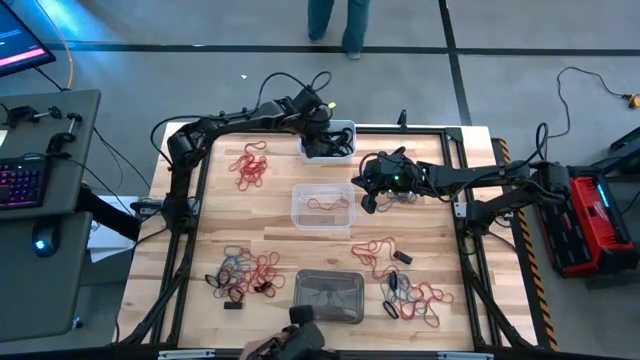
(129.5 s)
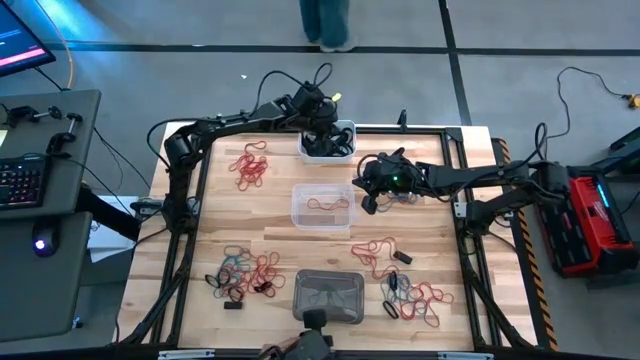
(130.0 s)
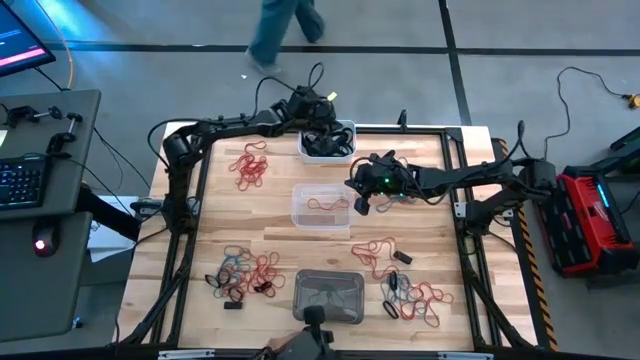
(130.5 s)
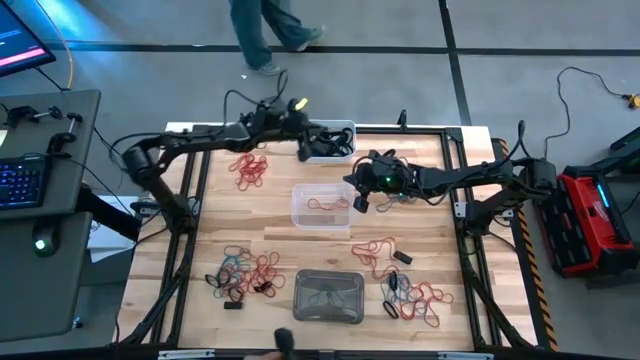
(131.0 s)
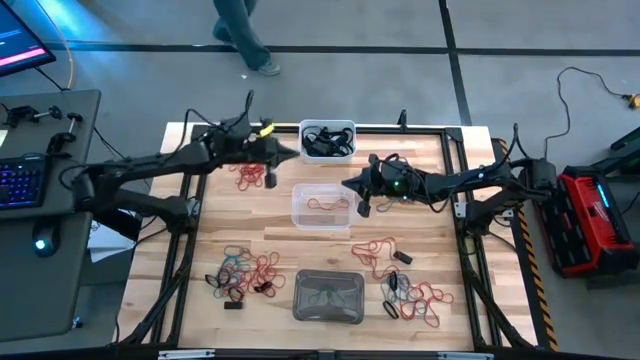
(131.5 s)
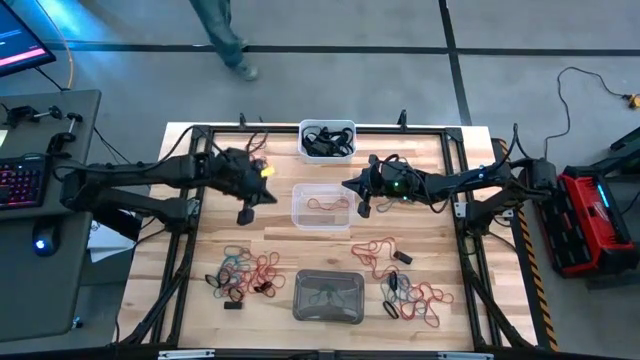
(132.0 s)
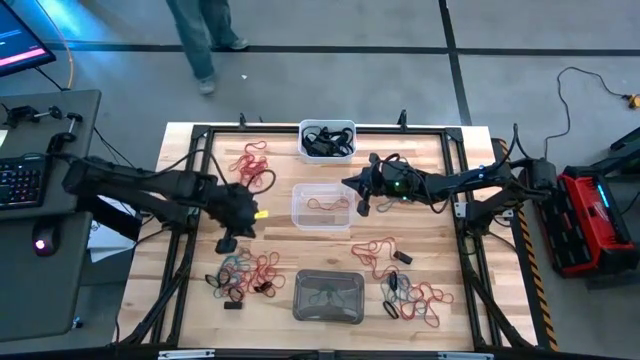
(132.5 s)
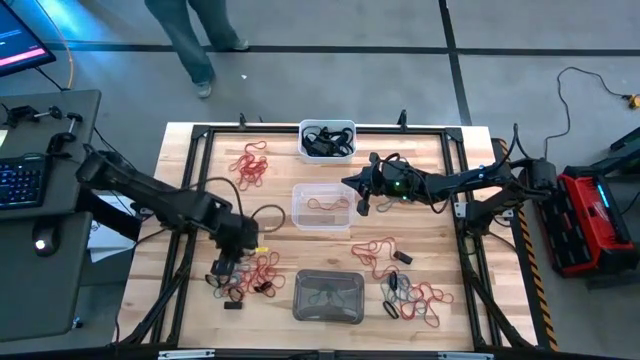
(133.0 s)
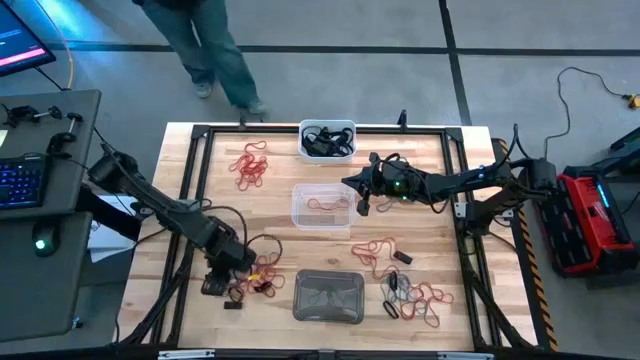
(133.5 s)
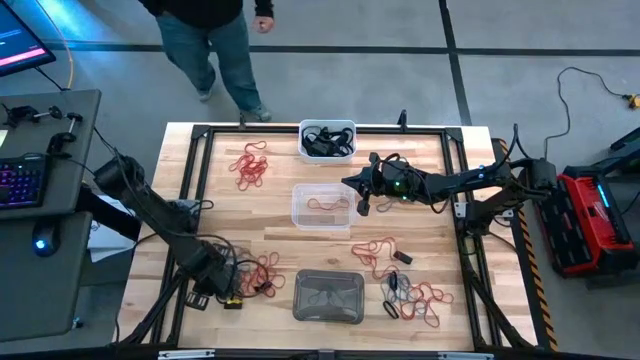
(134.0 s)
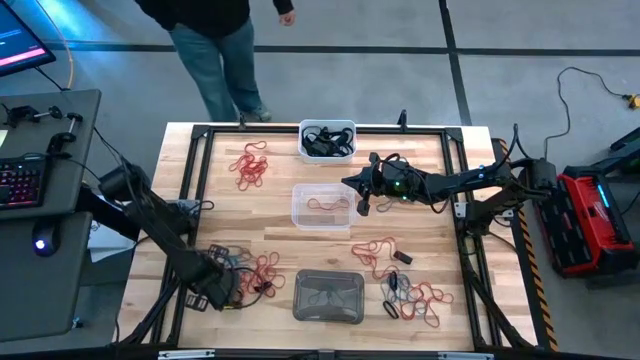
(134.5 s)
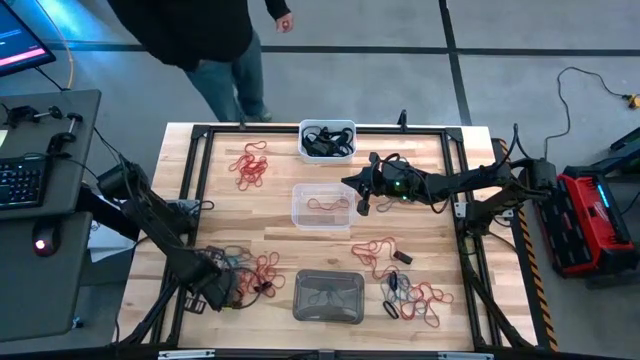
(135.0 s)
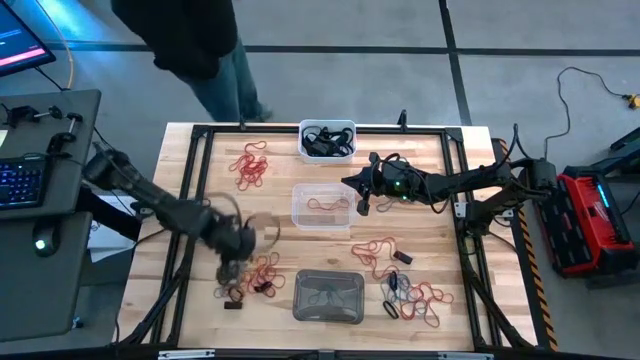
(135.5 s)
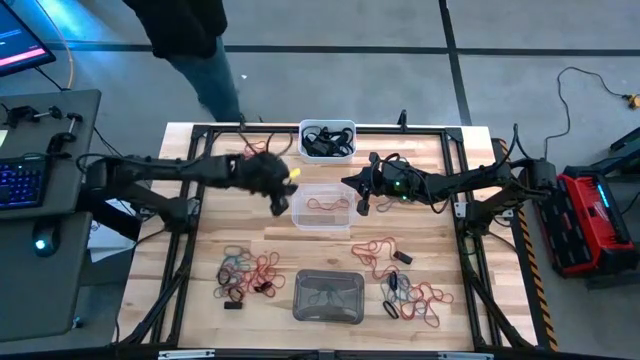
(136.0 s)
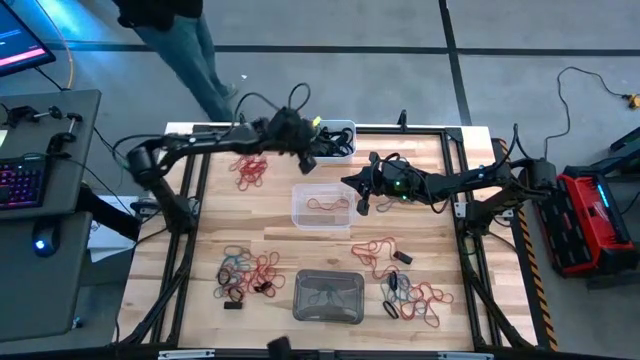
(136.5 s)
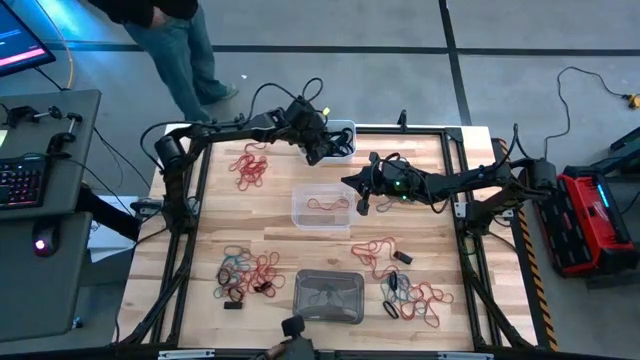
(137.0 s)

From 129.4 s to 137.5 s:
Task: Sort rubber bands into baskets
Put the black rubber band into the white bin

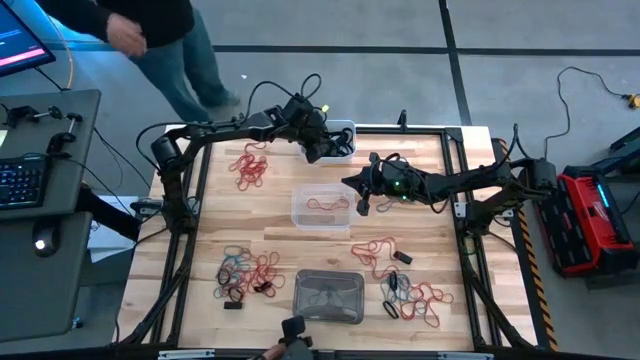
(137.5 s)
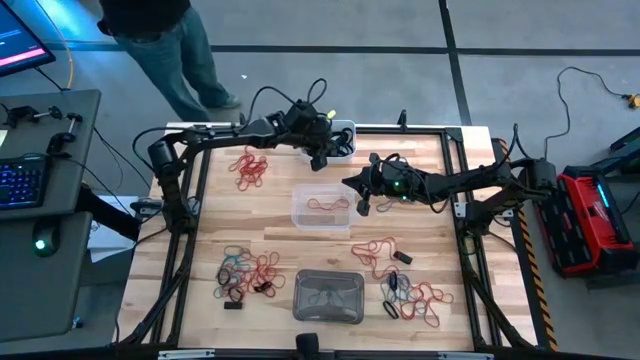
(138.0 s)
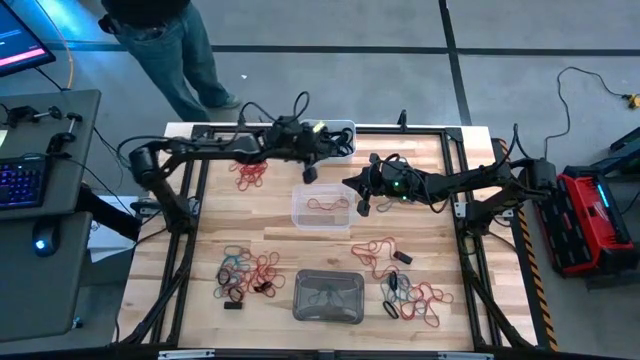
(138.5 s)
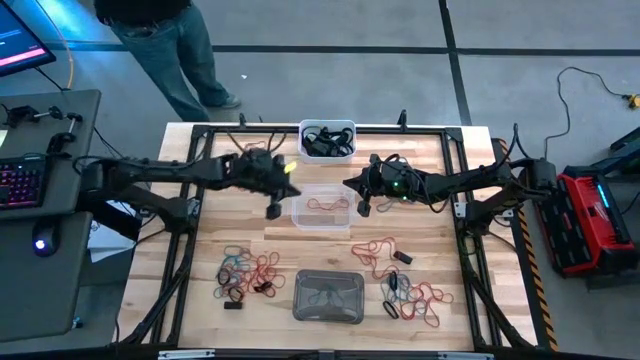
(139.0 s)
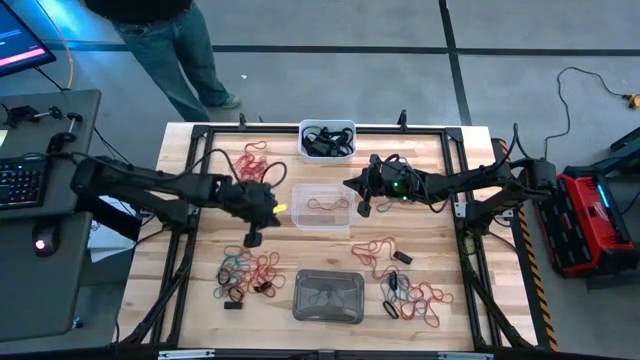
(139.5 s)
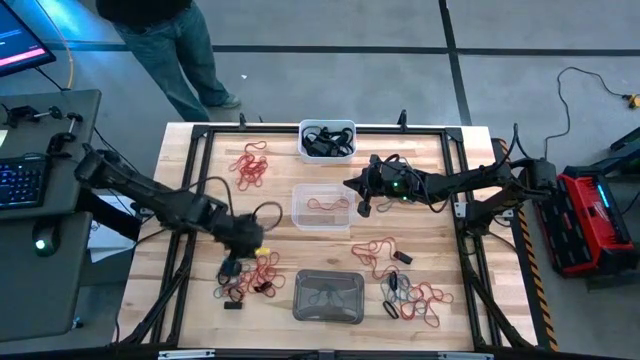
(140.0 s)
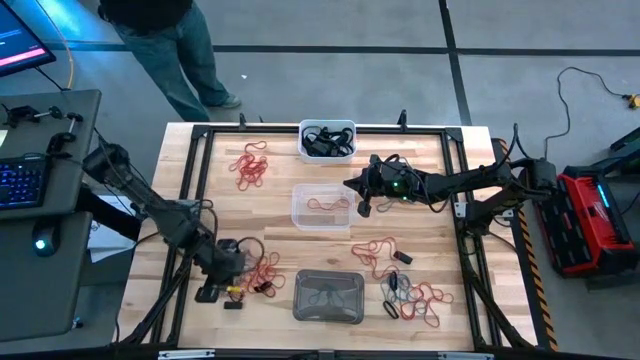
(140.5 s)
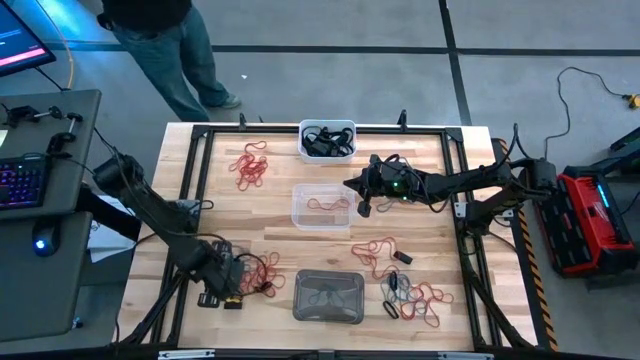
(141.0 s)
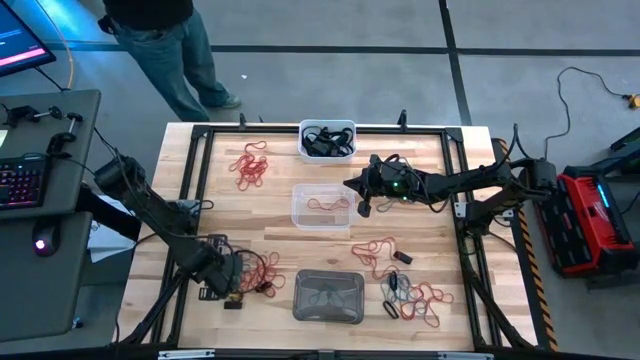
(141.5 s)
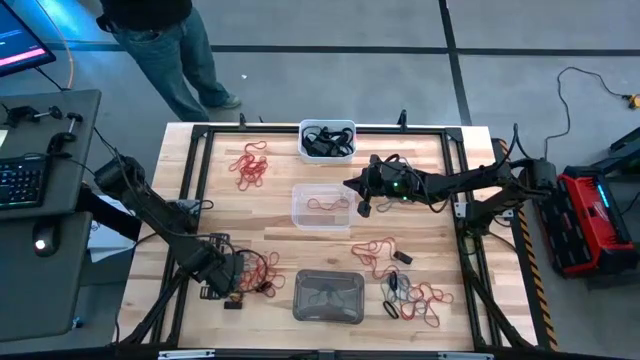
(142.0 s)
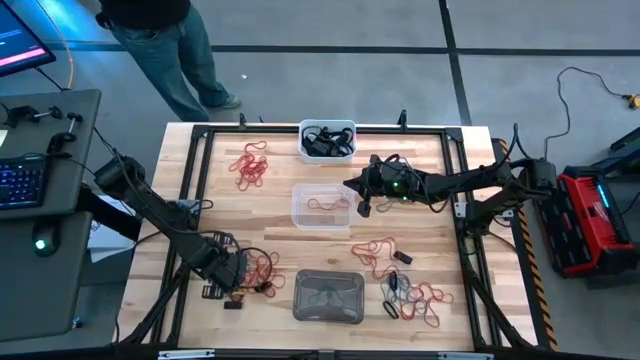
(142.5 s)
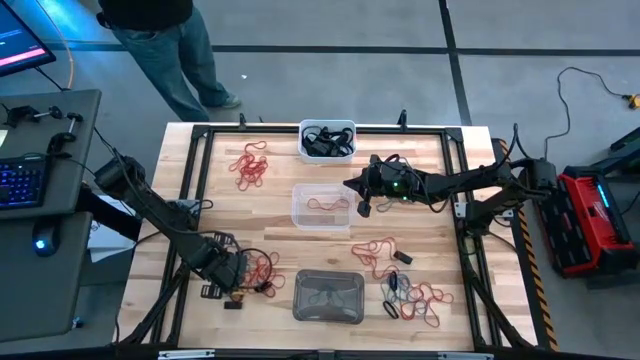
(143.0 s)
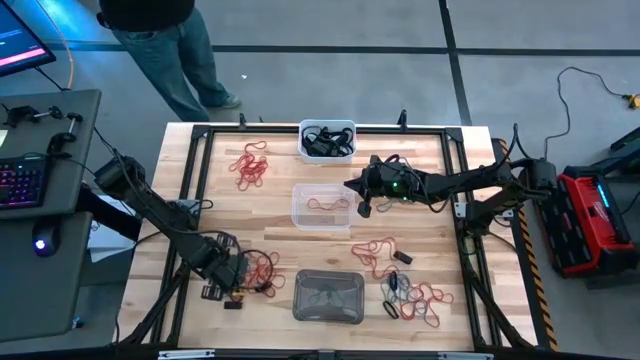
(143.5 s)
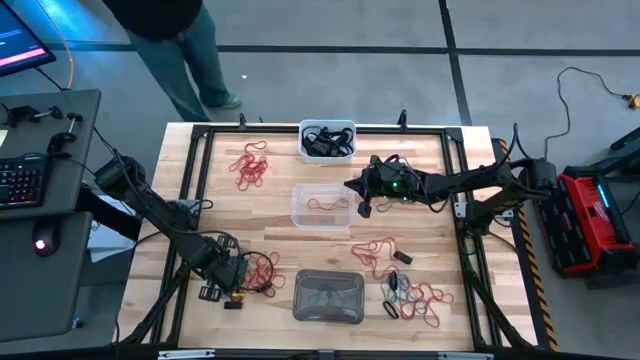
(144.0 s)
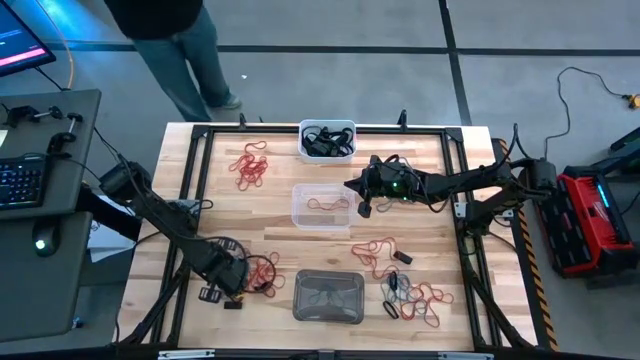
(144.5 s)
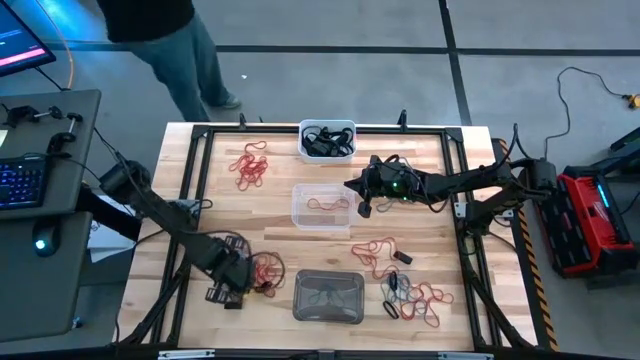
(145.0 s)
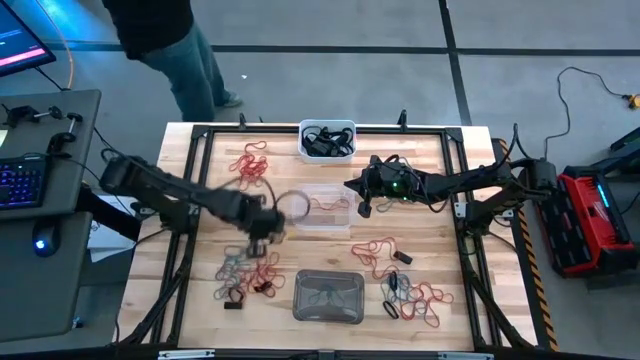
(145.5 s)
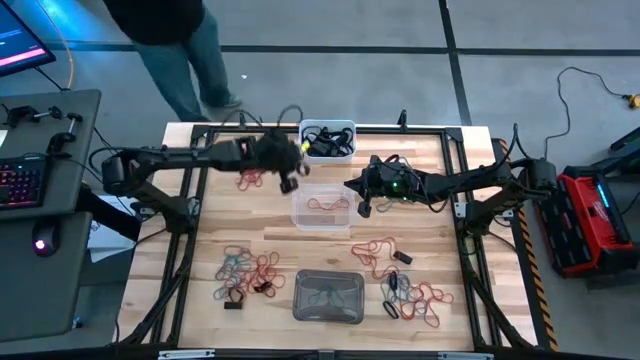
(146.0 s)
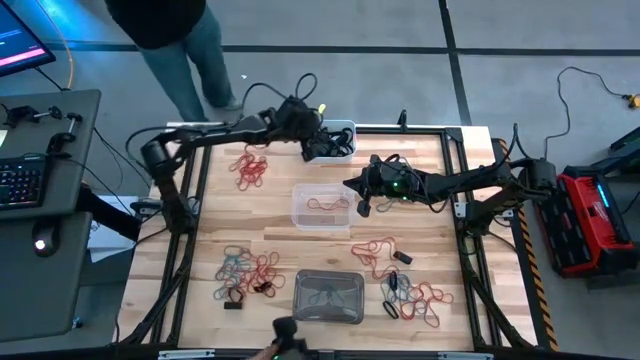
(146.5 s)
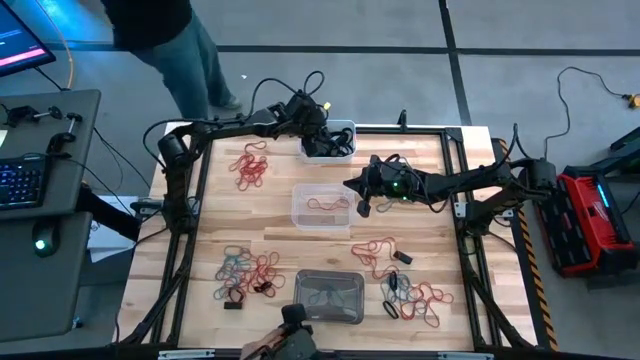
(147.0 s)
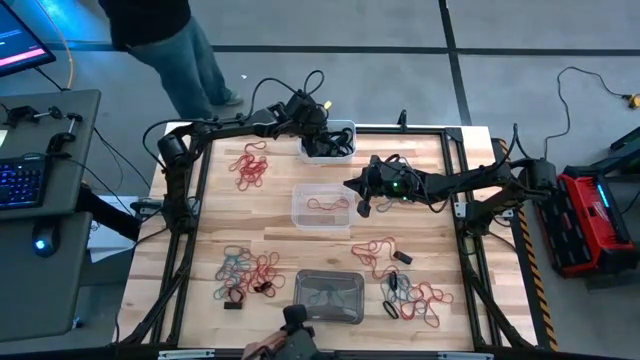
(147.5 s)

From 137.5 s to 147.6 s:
Put the black rubber band into the white bin

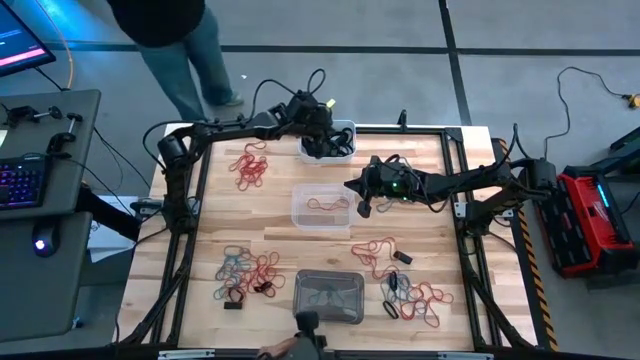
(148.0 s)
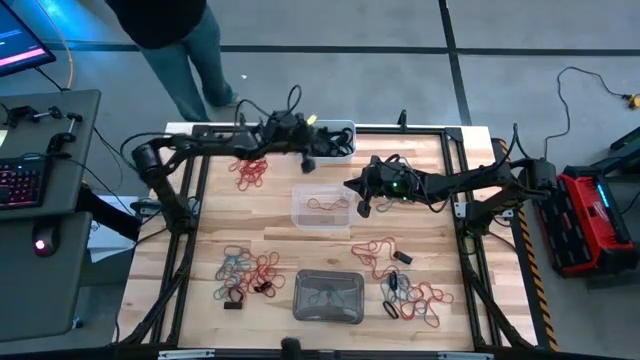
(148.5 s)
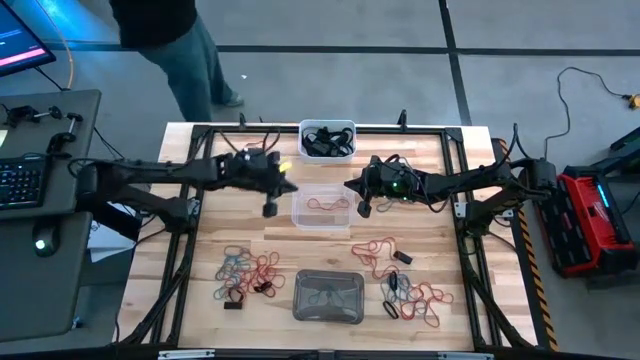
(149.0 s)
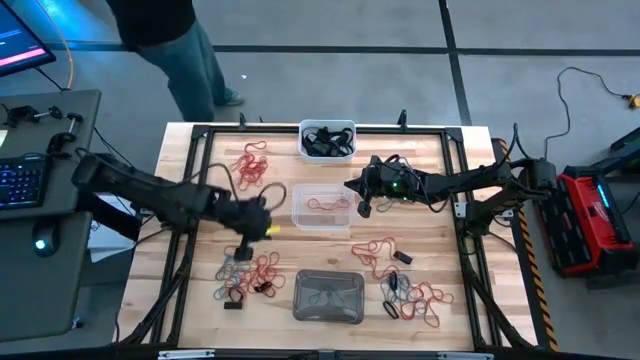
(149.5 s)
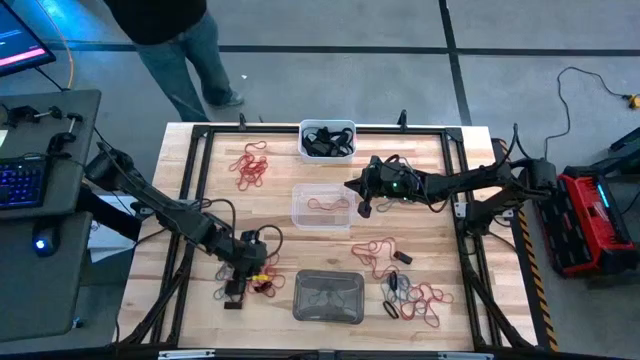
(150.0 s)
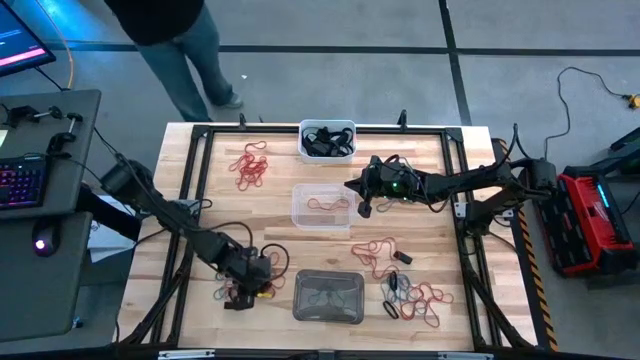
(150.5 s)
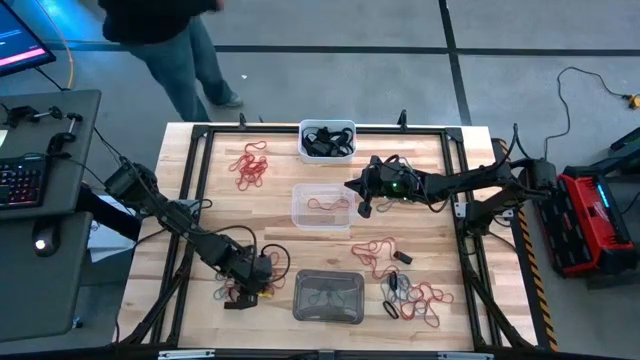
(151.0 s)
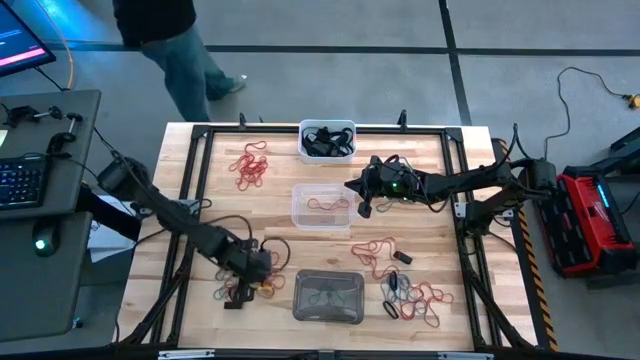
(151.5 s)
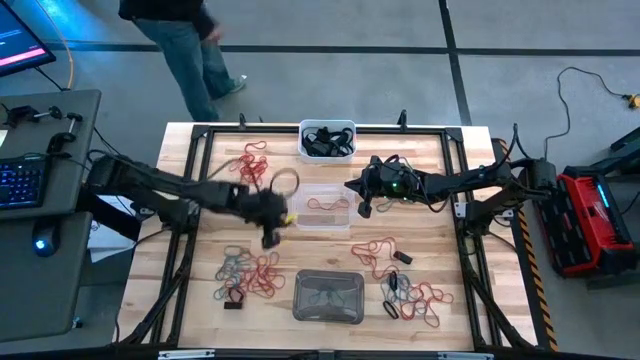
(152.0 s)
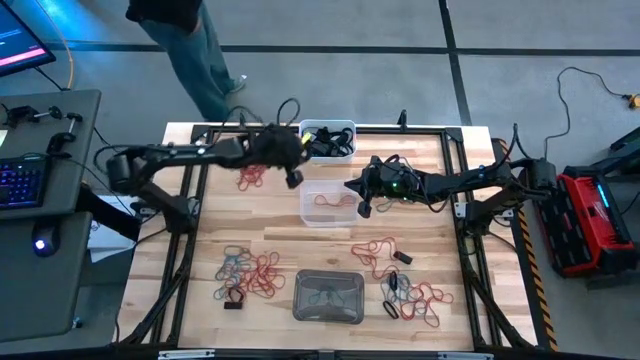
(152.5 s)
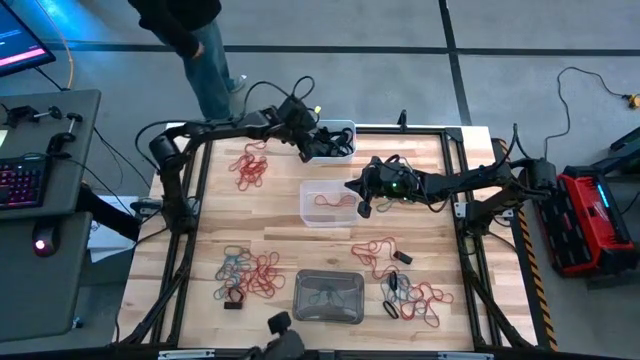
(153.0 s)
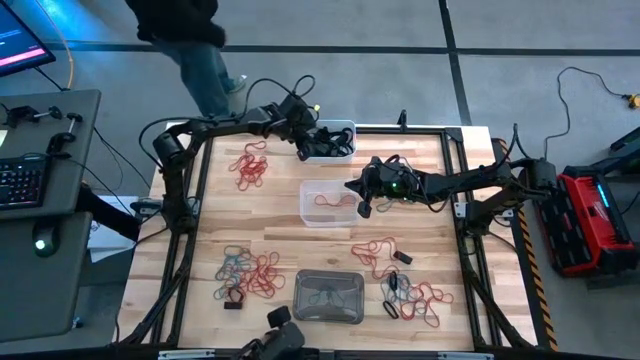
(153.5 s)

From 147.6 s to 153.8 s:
Put the black rubber band into the white bin
